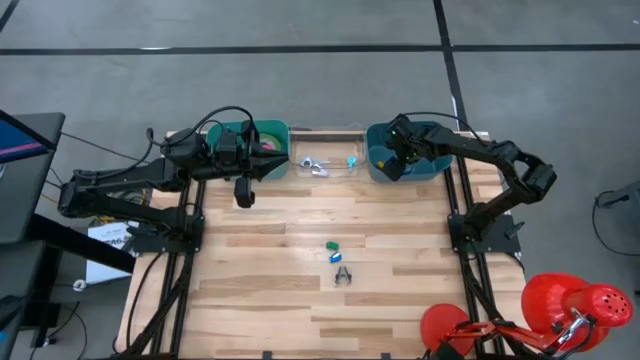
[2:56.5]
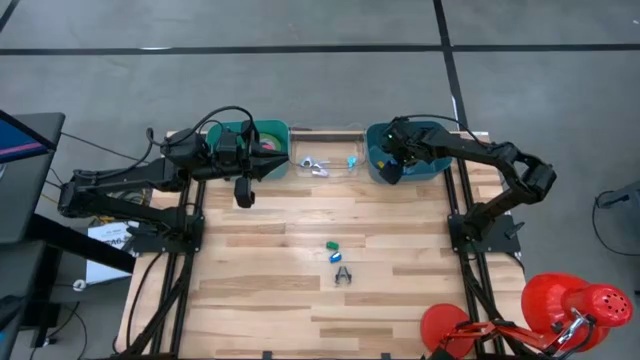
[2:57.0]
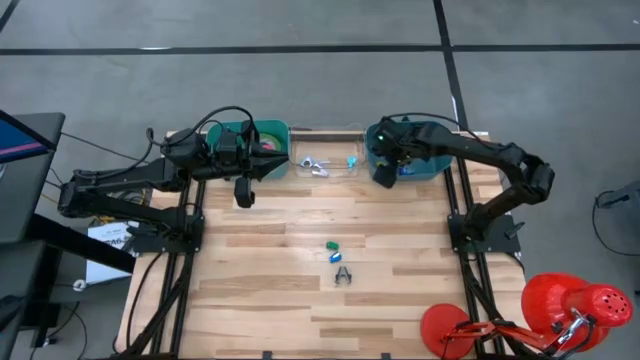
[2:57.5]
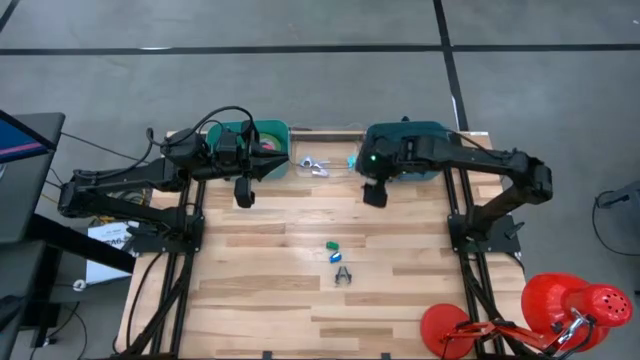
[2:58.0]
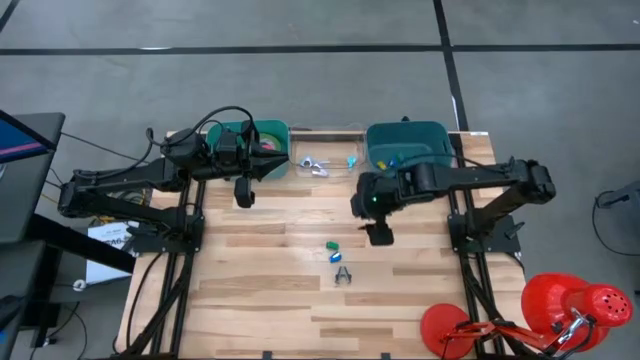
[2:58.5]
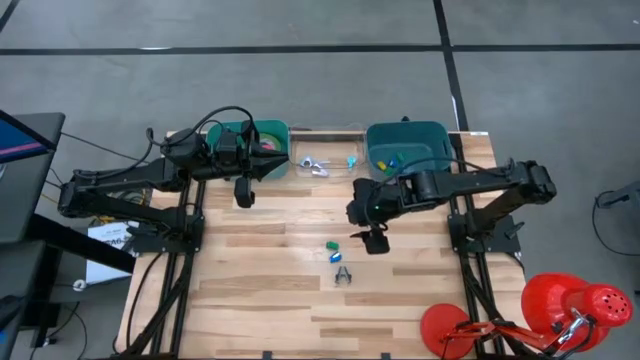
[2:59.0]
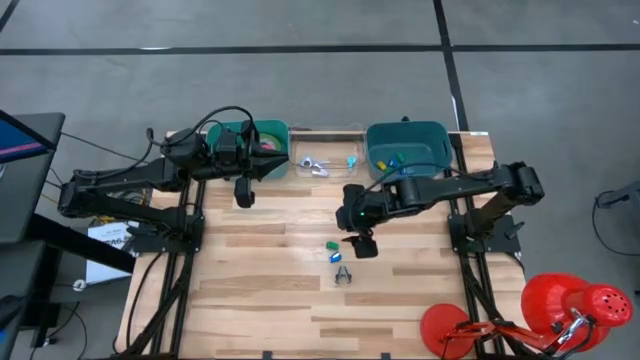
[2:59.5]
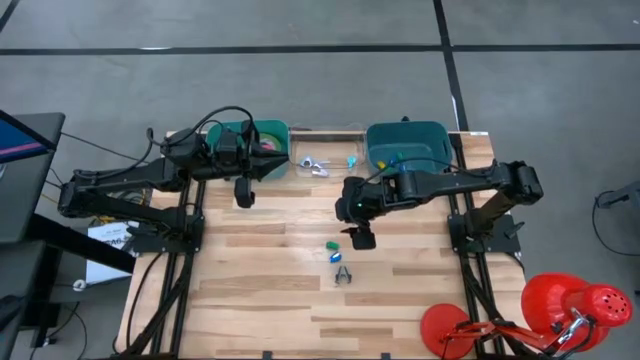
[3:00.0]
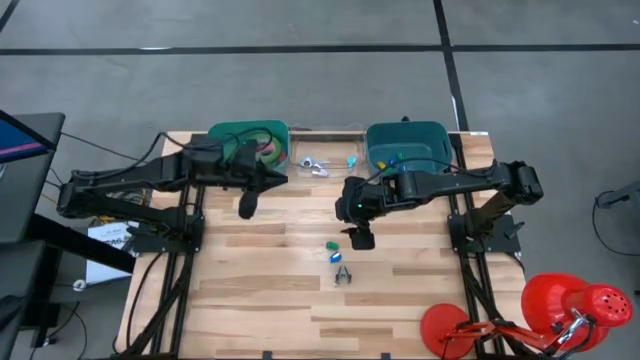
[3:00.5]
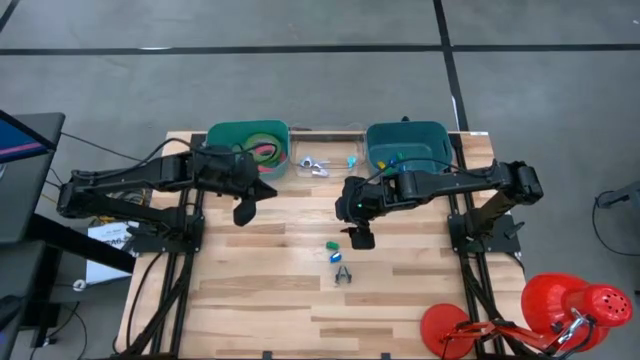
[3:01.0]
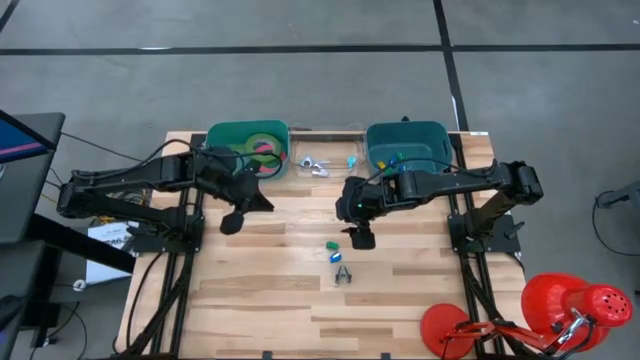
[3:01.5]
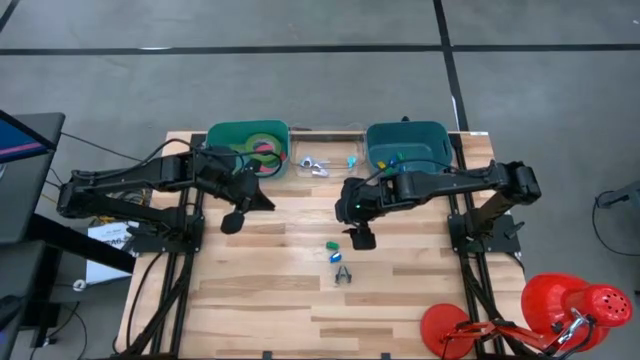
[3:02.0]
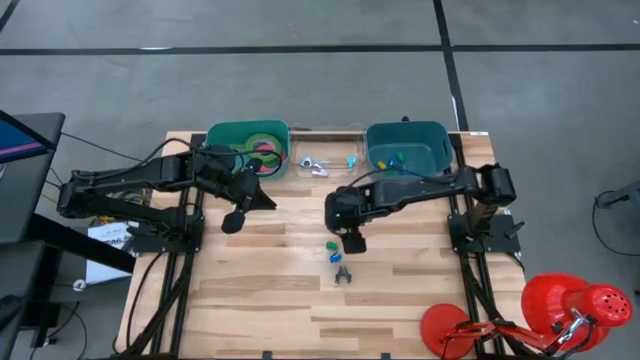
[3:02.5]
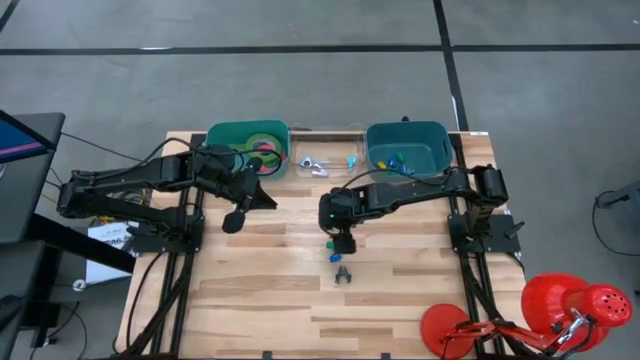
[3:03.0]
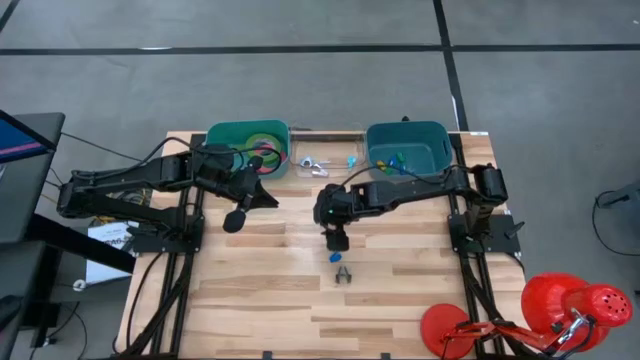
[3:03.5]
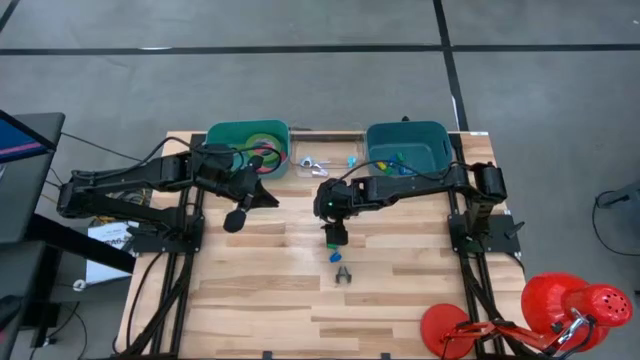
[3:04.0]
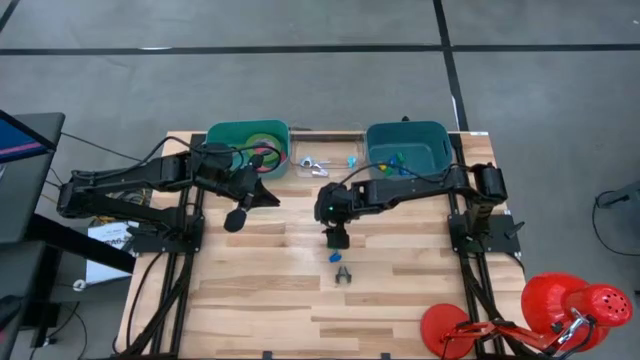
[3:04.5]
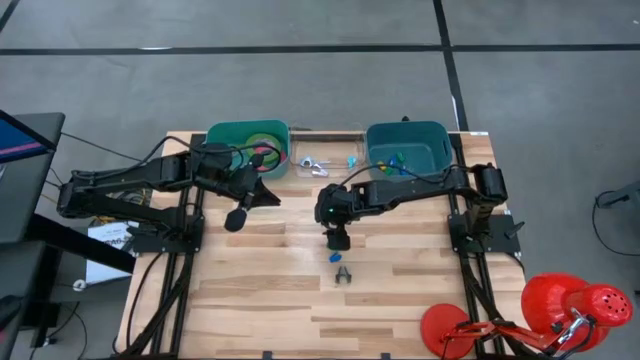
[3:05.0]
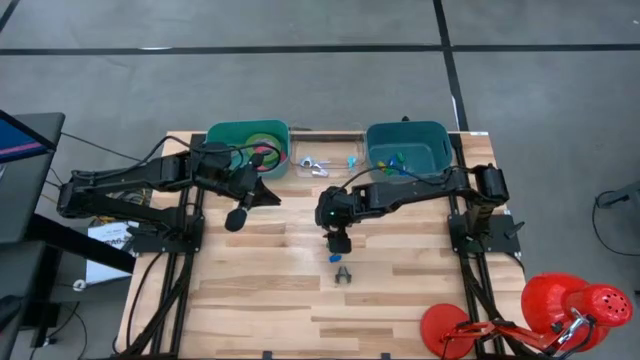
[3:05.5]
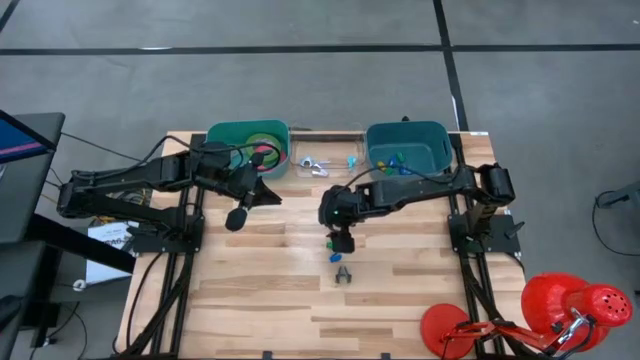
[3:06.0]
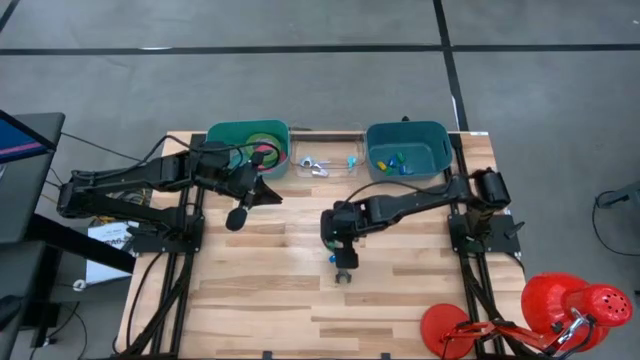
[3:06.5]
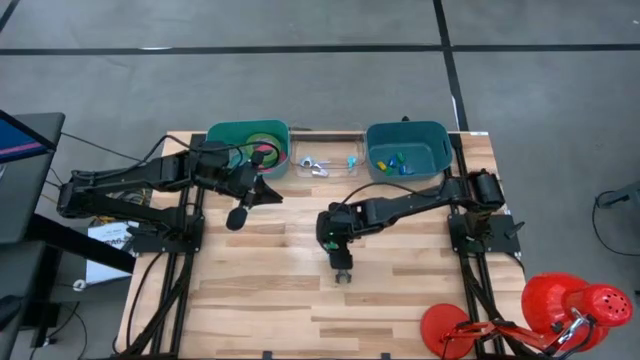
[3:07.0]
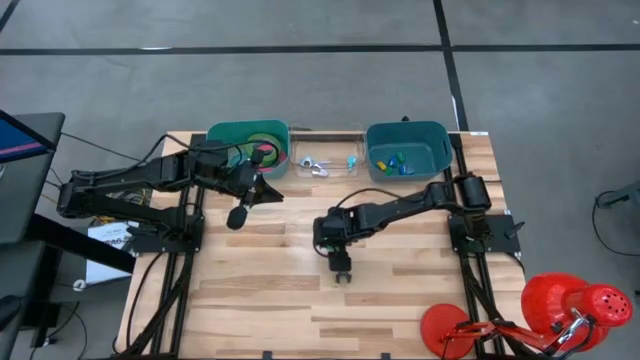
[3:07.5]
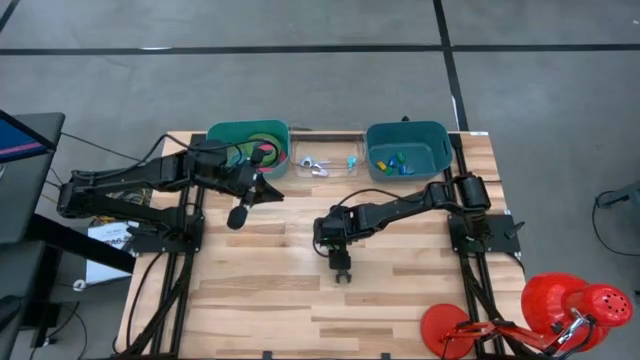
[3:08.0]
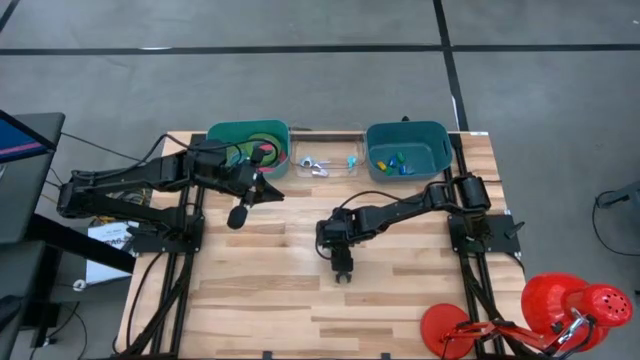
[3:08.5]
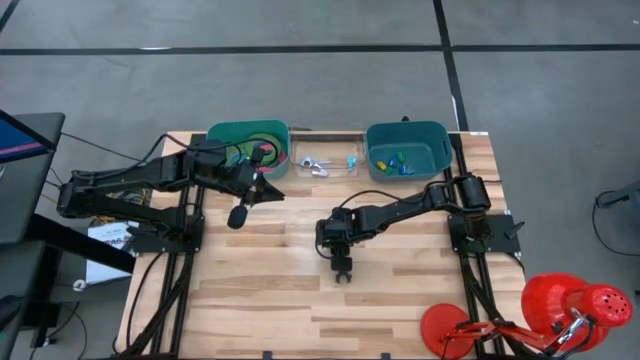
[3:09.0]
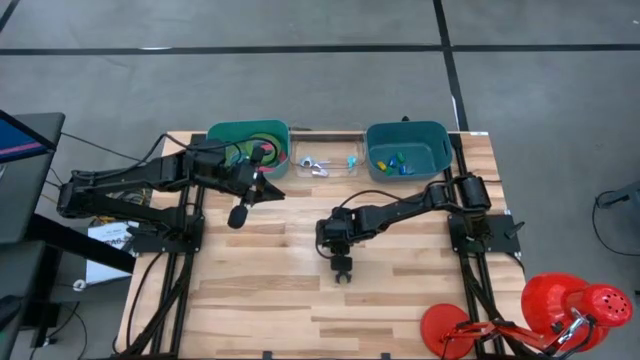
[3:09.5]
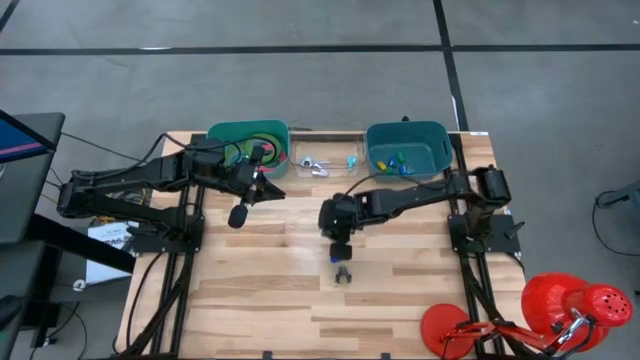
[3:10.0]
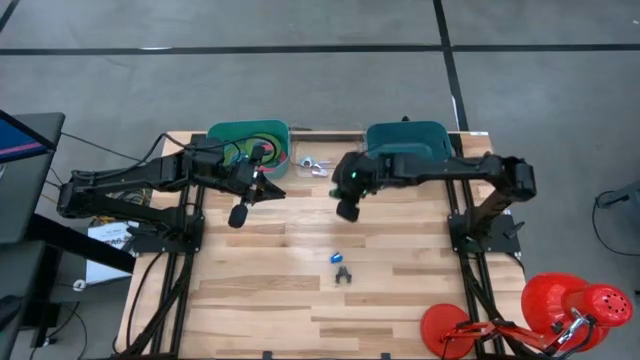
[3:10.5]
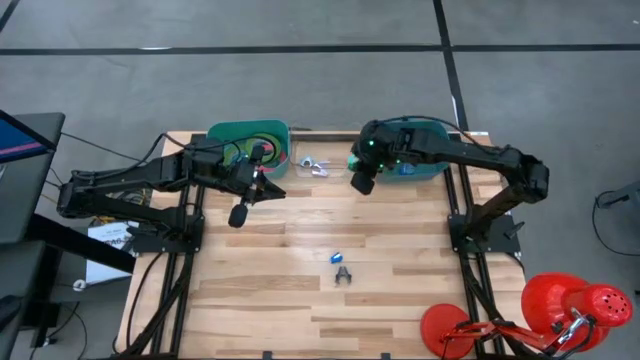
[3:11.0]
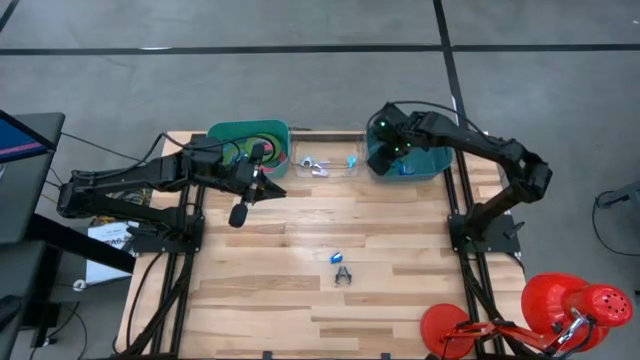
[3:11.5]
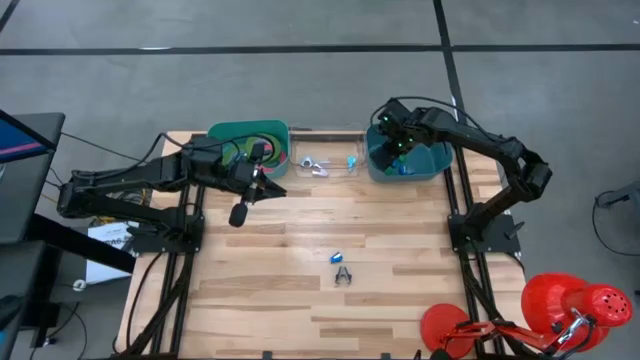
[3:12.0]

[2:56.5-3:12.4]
Task: Pick and place Stapler, Stapler remover, tape
Put the green stapler into the dark blue bin

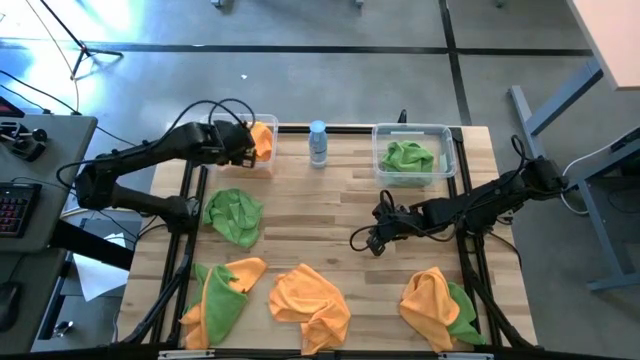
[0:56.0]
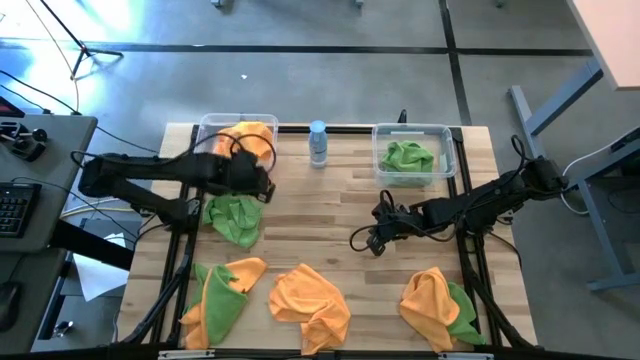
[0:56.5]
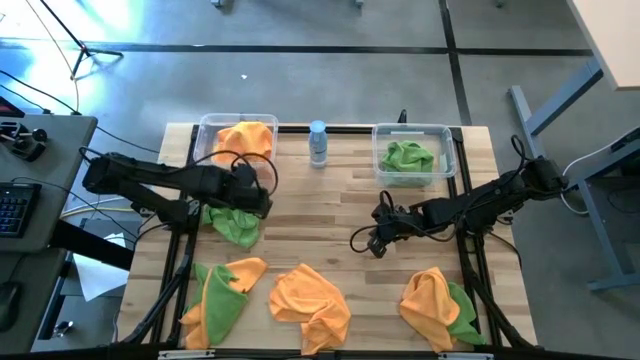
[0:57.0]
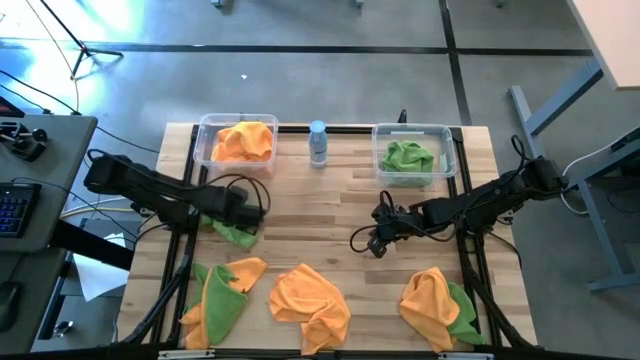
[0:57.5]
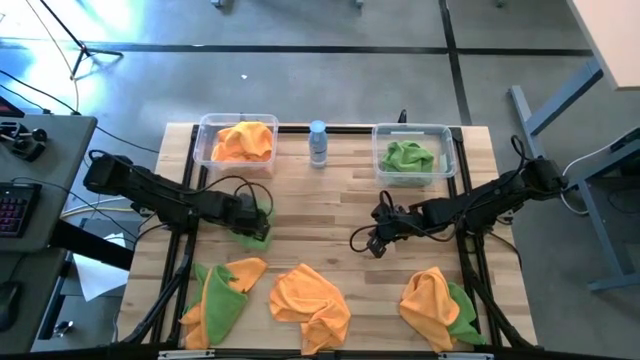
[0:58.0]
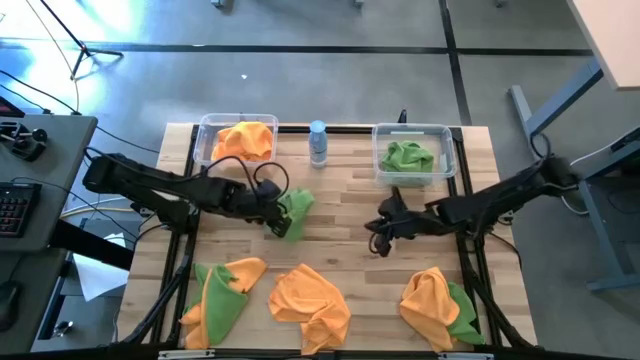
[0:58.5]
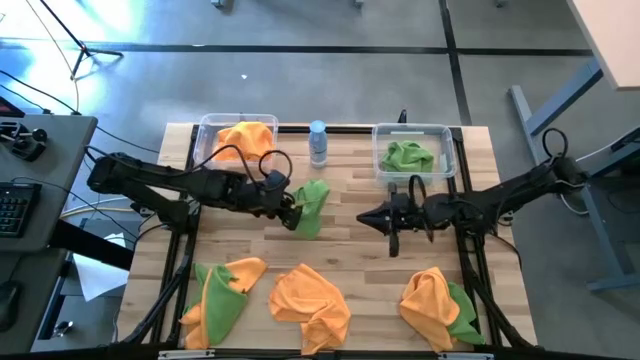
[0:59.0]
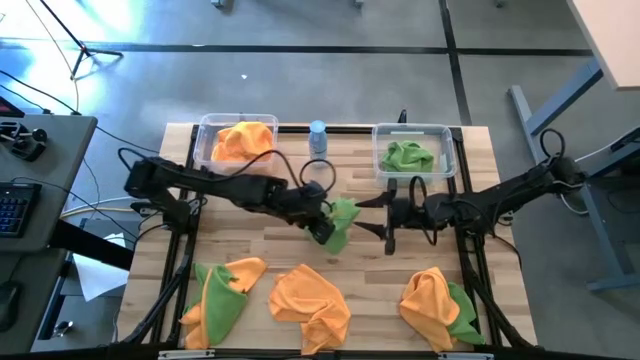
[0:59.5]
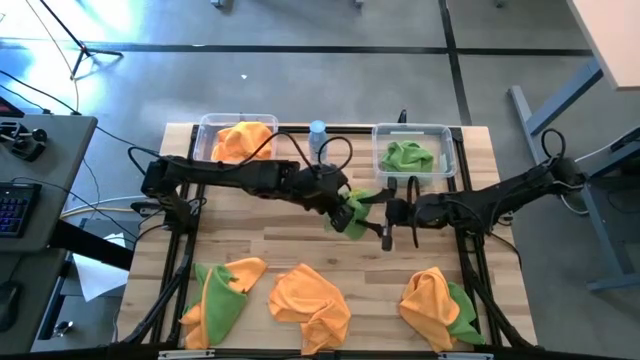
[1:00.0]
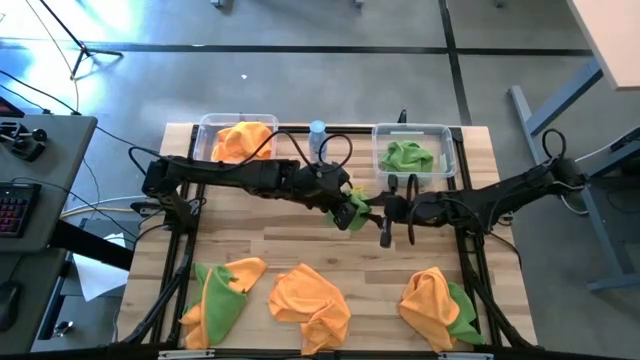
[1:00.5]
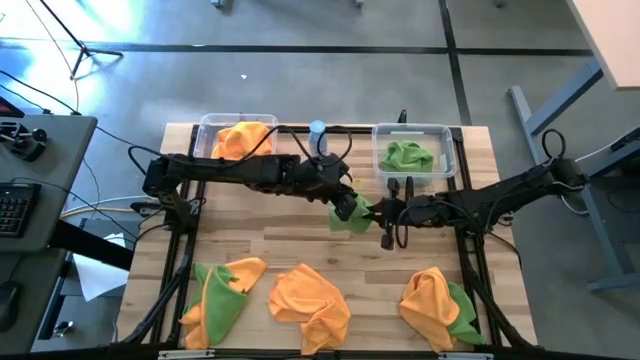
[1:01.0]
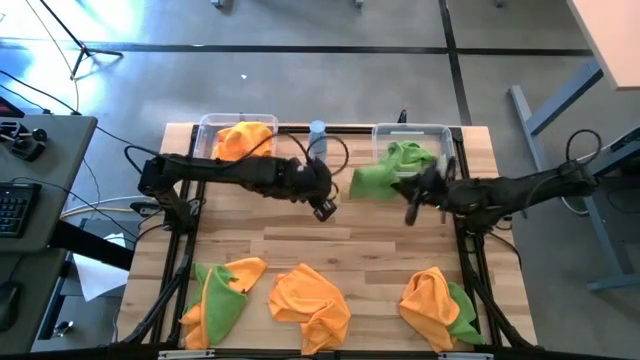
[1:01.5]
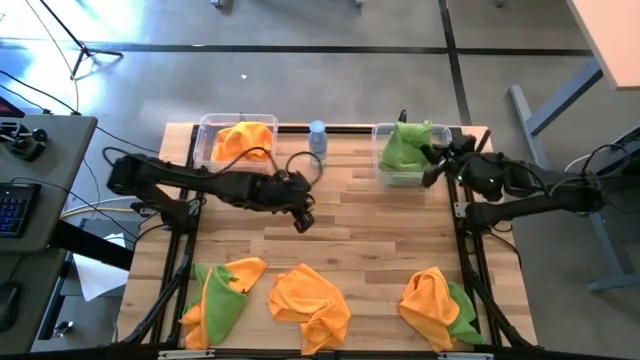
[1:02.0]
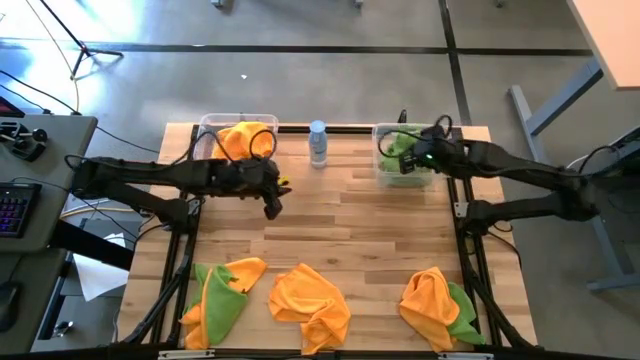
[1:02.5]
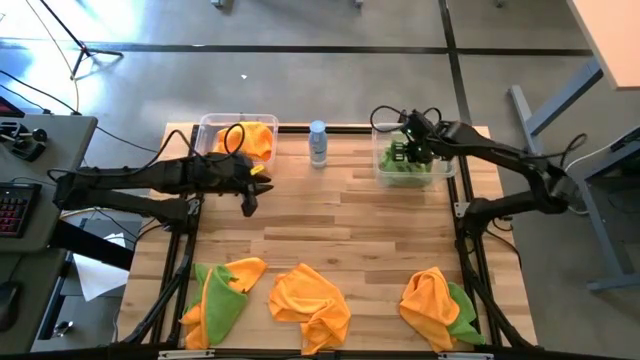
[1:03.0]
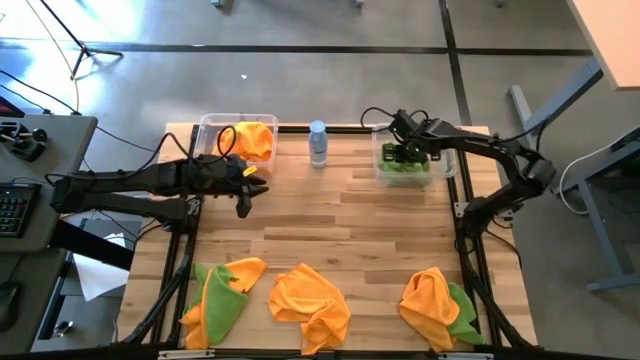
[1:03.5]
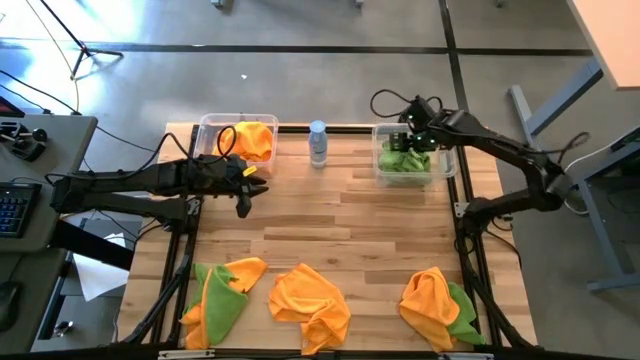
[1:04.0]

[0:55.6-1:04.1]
Task: Sort microfiber towel by color & place in baskets
Put the green towel into the right transparent bin
